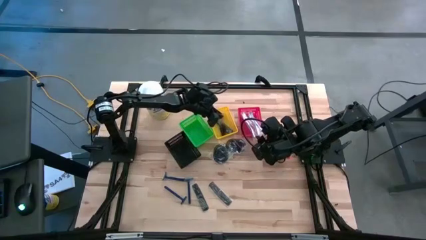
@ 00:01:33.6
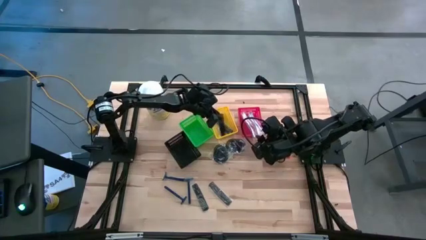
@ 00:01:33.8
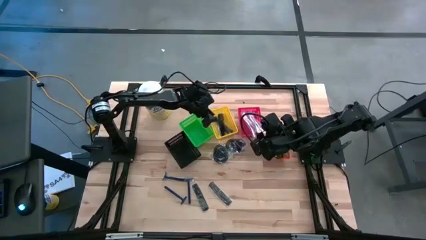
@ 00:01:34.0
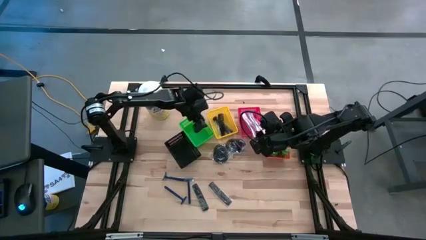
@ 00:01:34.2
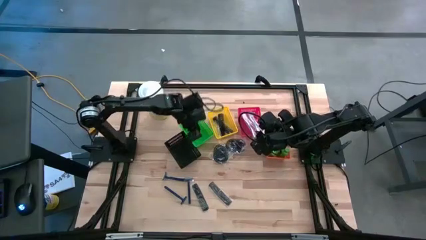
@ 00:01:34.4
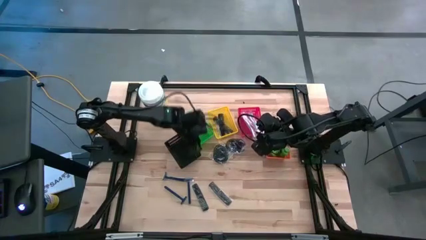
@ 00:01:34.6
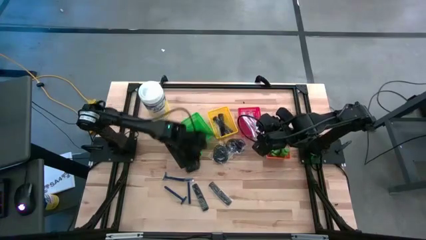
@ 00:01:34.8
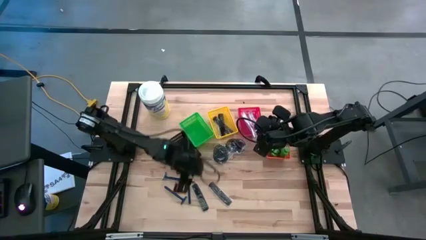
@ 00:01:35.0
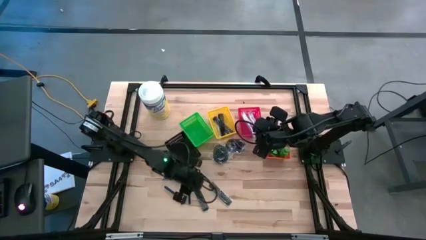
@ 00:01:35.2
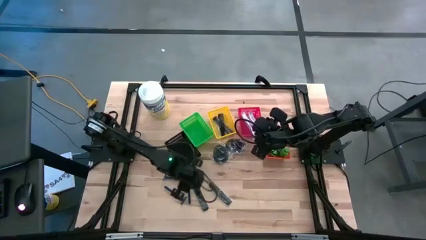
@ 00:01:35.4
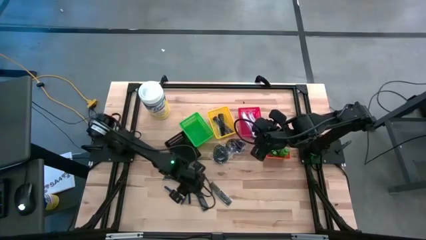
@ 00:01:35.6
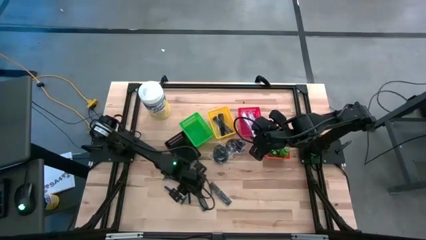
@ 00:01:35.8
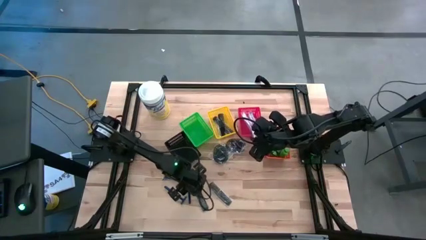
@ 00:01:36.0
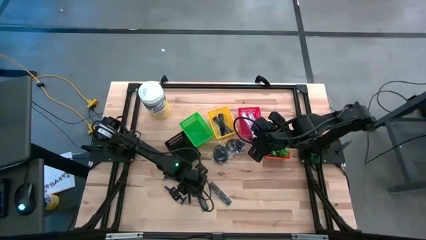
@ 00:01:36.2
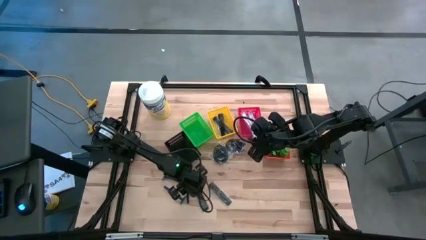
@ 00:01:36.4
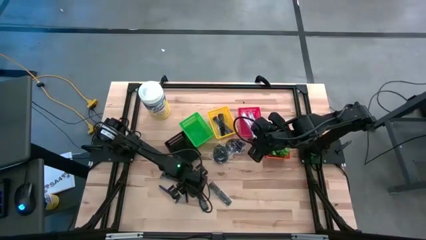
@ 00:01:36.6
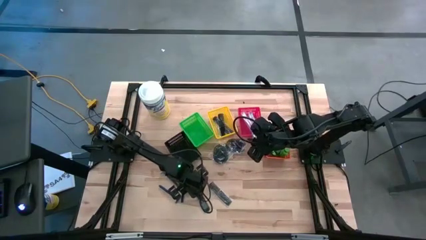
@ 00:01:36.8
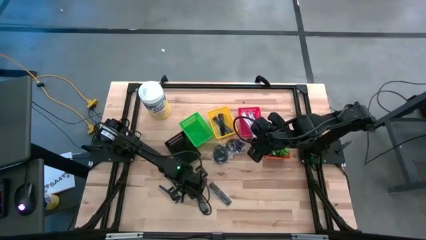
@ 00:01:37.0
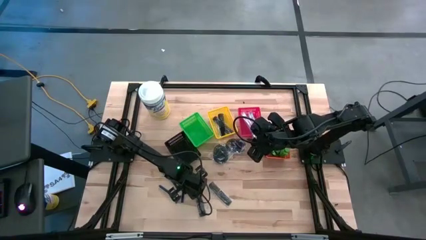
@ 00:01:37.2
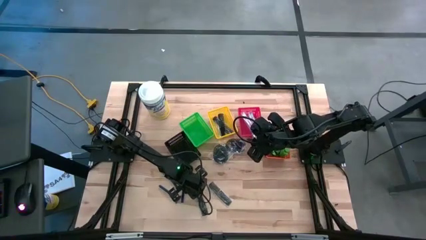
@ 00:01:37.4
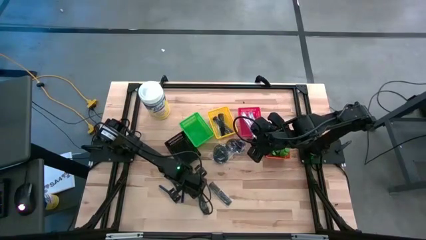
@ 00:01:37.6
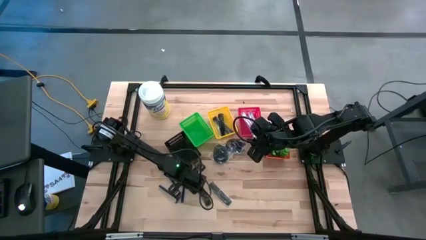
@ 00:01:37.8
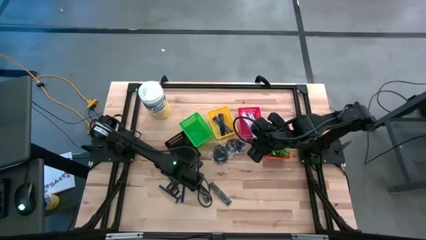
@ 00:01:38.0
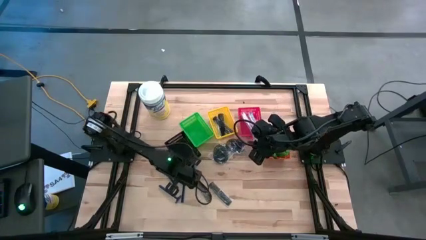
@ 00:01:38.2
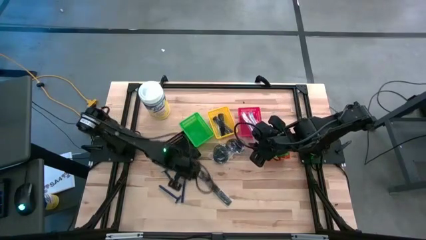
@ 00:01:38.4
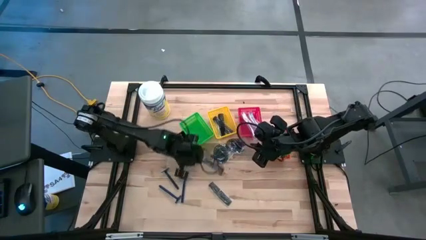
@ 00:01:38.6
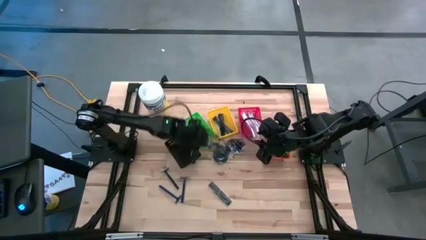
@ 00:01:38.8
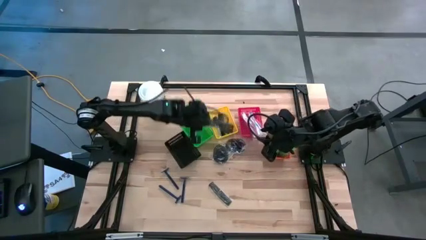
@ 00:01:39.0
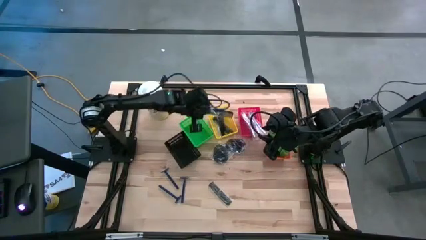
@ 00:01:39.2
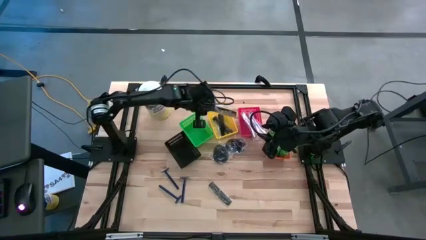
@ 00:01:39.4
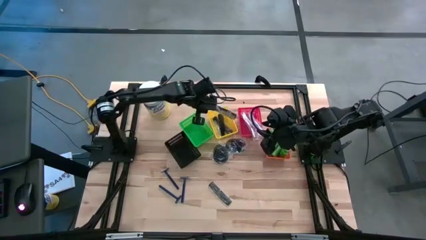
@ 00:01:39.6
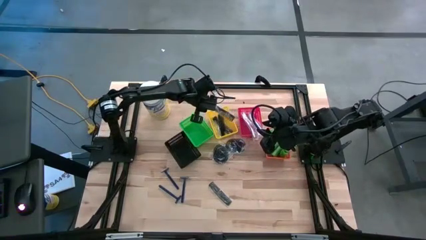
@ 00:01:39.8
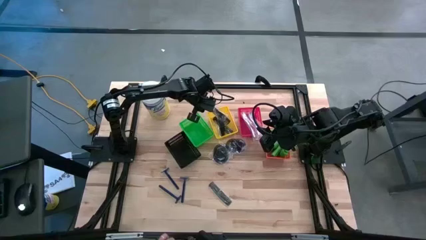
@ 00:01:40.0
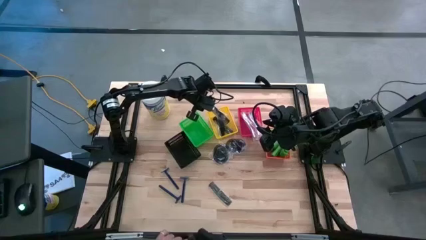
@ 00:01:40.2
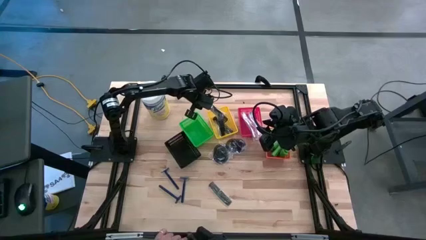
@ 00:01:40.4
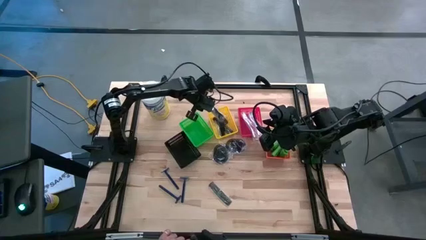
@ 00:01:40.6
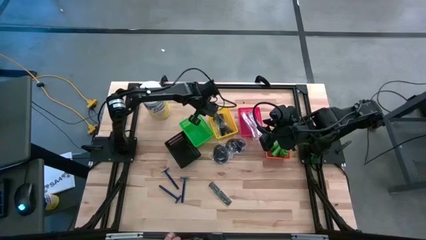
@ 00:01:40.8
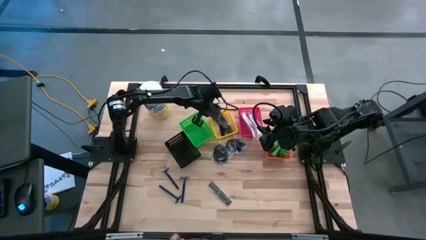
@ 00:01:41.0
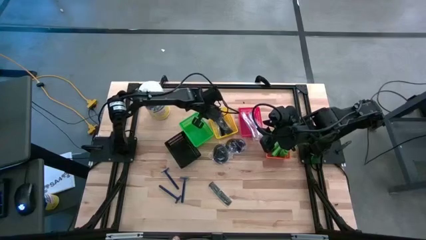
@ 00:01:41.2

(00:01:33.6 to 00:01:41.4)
Task: Pick & Place Travel size toiletries
Put the black hair comb into the yellow bin

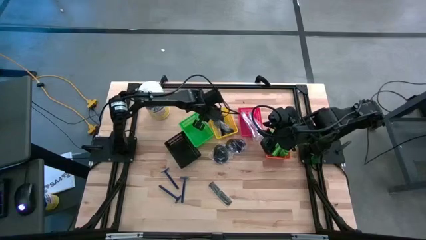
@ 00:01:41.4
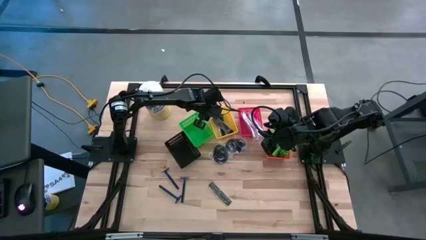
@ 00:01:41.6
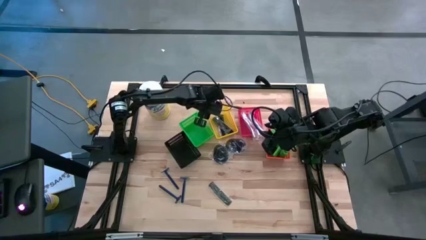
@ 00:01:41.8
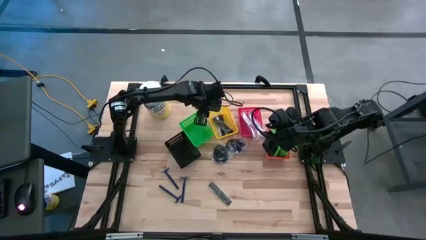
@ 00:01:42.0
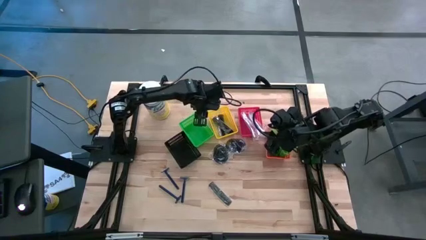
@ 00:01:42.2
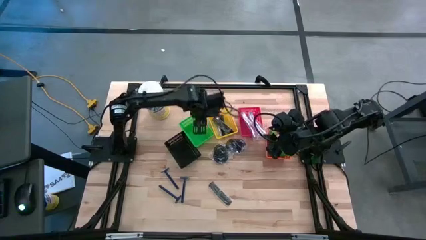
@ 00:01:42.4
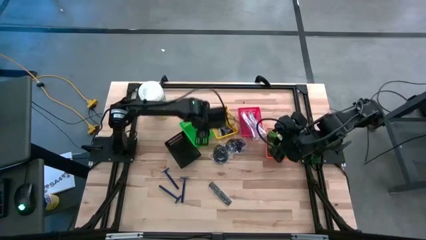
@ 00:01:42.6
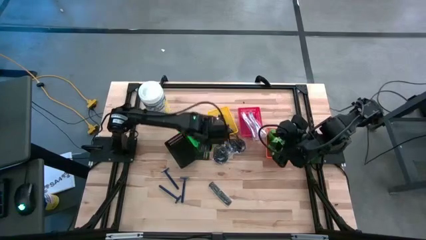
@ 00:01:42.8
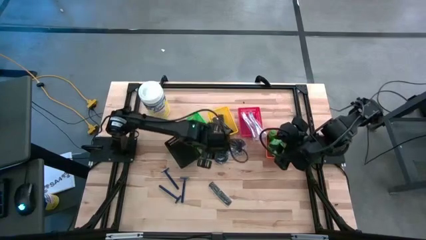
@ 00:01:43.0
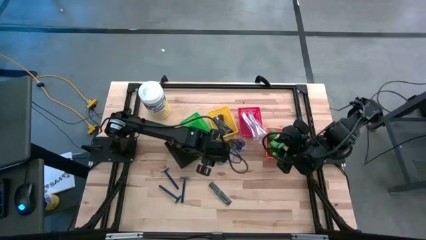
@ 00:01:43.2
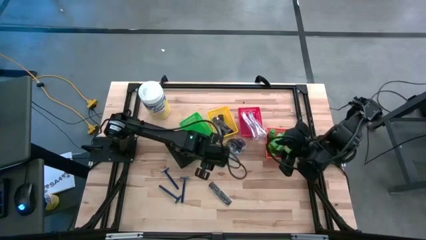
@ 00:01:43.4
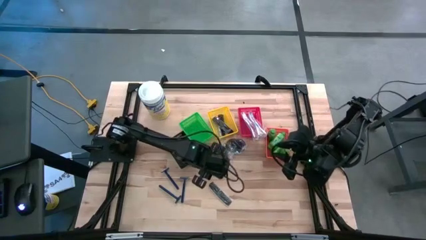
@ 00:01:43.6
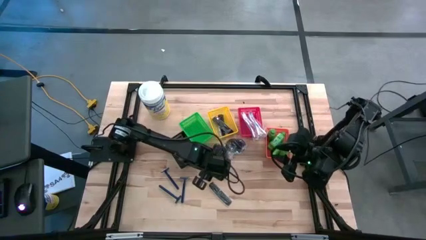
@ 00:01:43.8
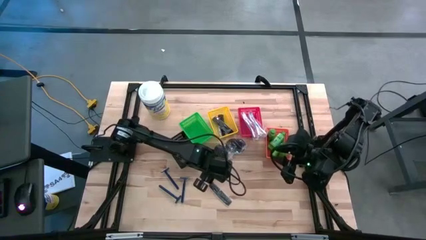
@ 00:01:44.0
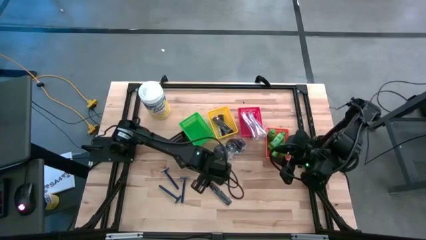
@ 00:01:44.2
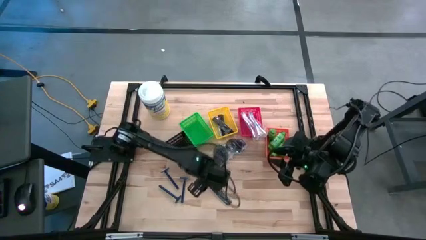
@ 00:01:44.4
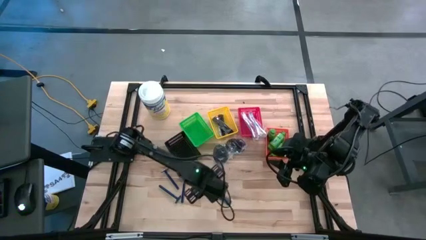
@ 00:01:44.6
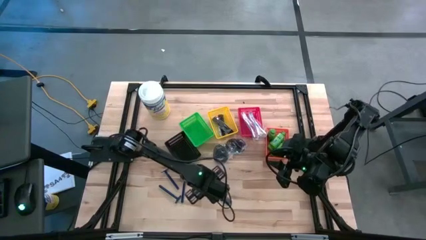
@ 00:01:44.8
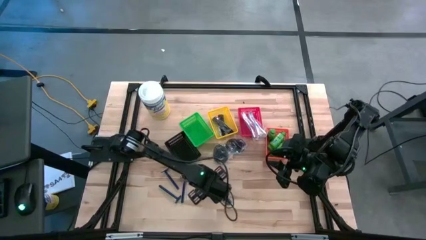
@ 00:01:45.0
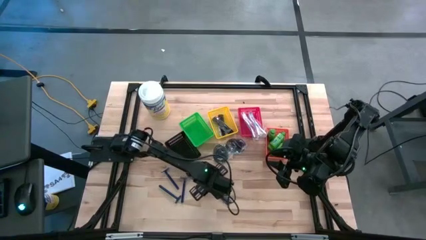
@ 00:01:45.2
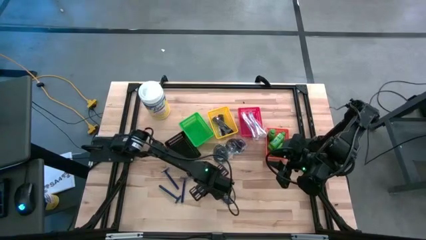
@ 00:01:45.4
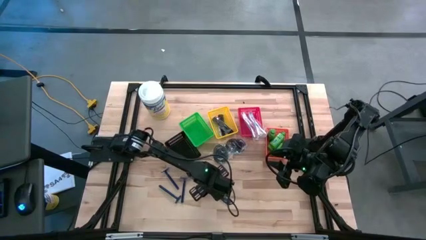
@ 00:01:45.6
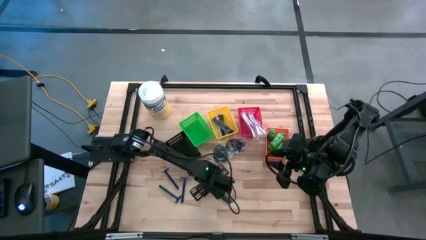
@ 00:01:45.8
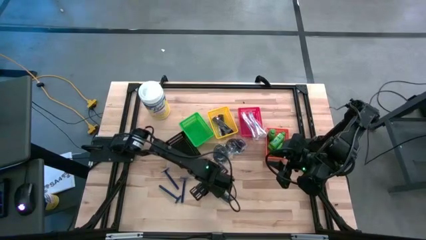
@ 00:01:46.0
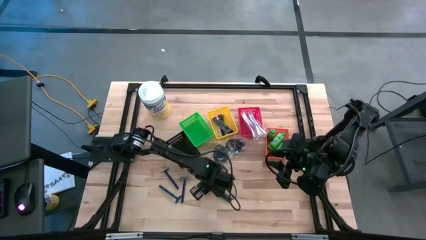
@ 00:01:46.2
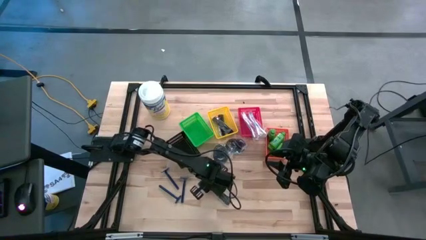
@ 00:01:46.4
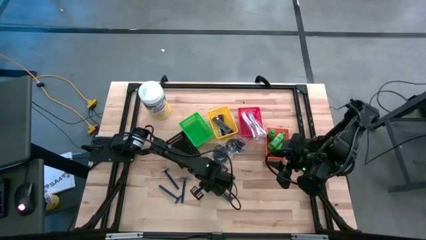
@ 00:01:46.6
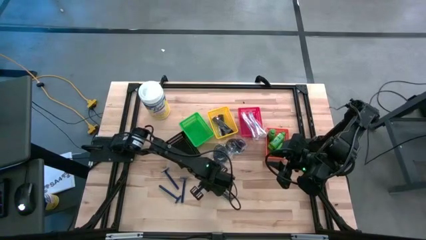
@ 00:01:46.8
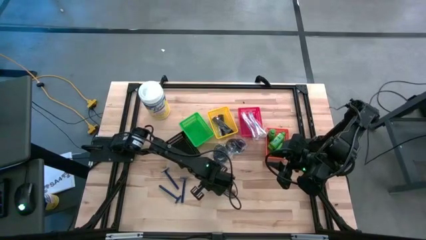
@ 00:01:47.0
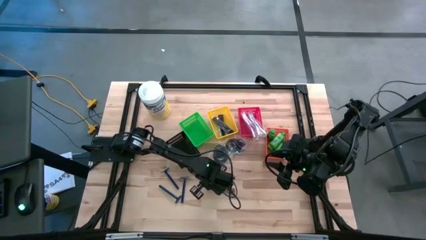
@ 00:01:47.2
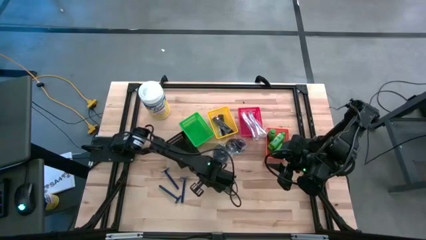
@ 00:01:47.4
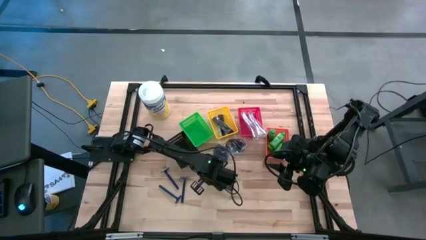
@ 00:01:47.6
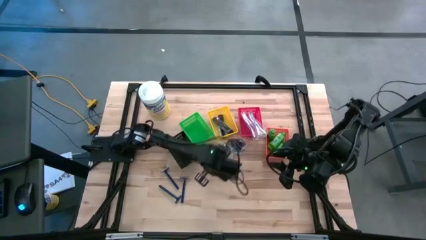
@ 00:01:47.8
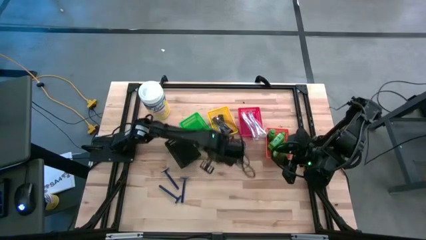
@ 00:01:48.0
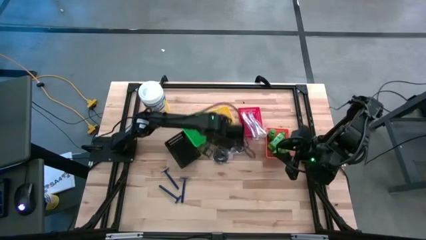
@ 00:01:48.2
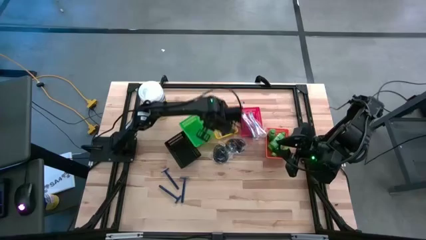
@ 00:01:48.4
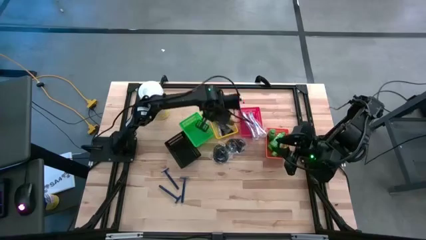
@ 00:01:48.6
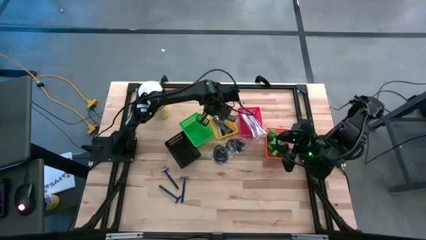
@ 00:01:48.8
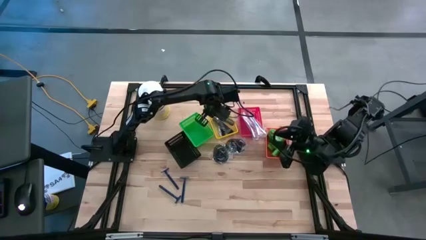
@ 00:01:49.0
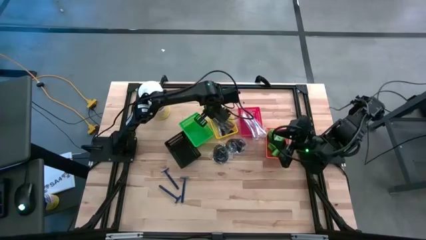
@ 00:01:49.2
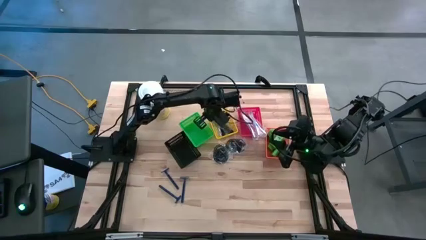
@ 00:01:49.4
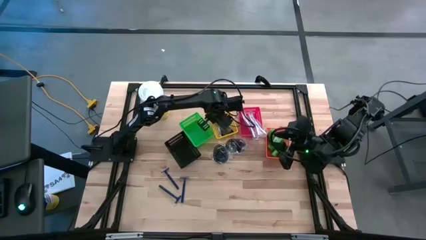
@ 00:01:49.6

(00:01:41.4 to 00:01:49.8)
Put the black hair comb into the yellow bin
